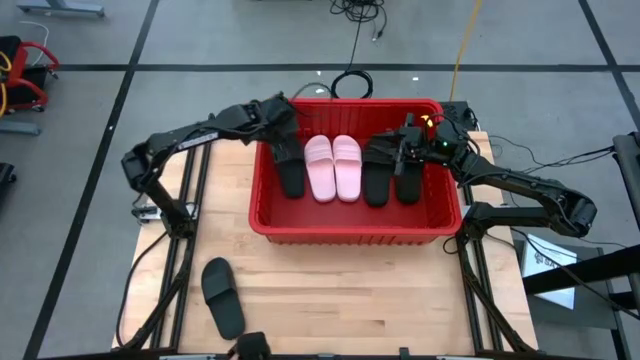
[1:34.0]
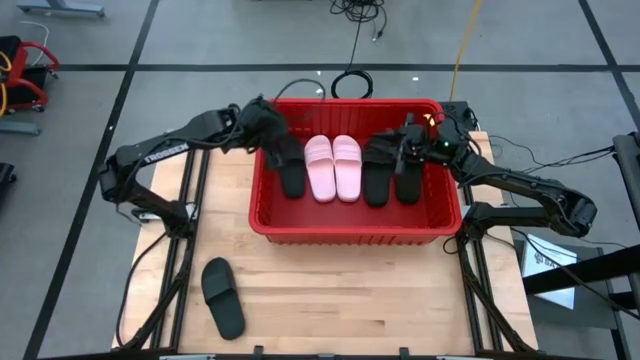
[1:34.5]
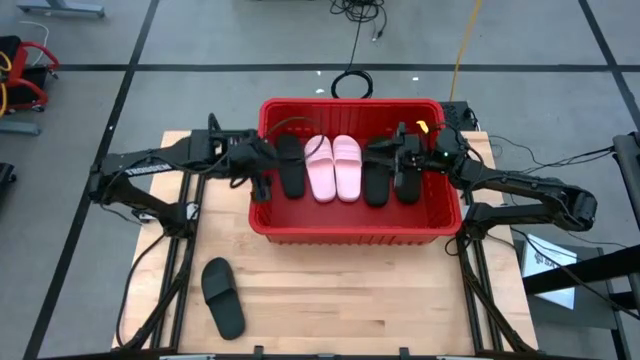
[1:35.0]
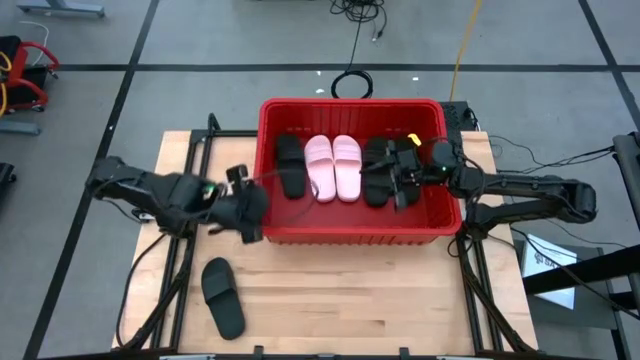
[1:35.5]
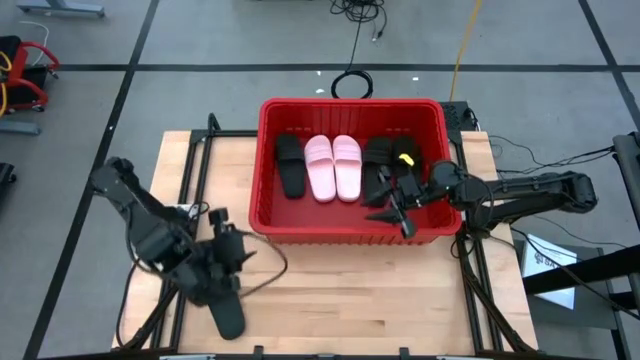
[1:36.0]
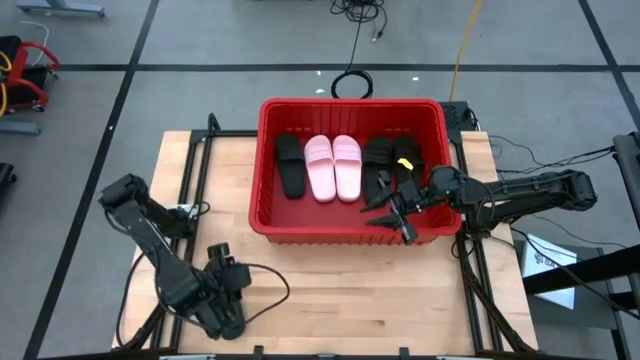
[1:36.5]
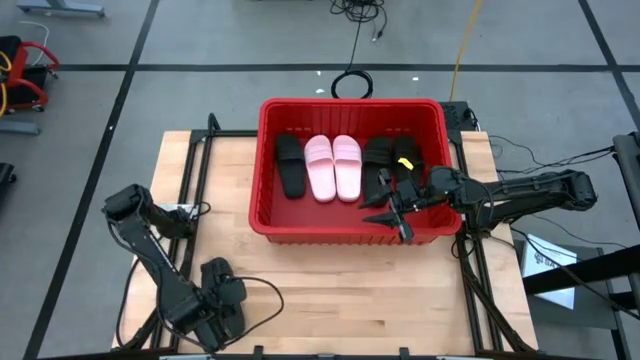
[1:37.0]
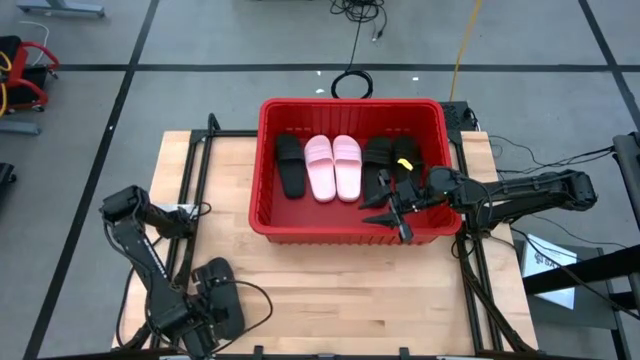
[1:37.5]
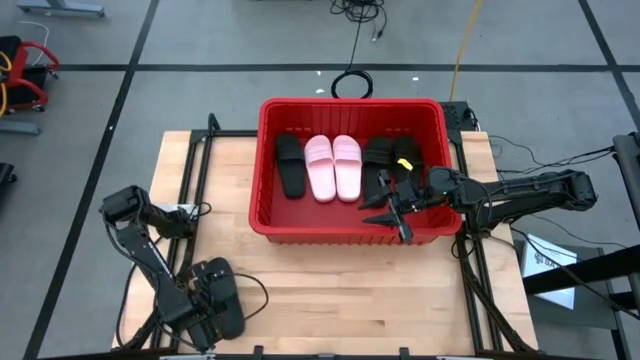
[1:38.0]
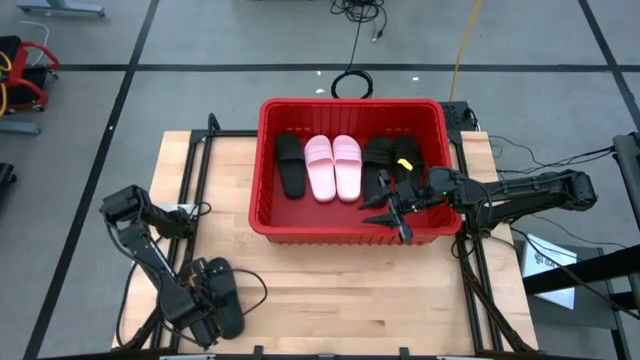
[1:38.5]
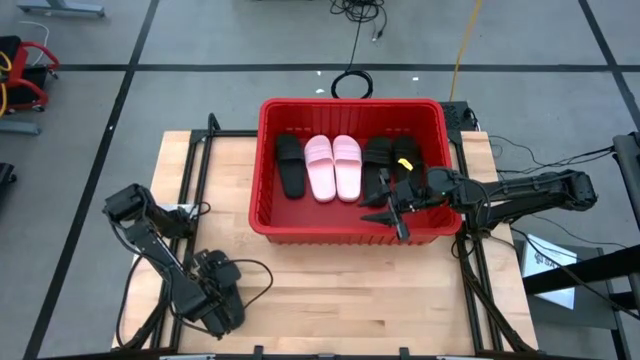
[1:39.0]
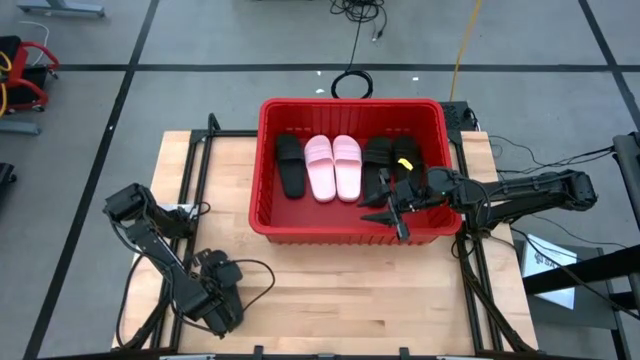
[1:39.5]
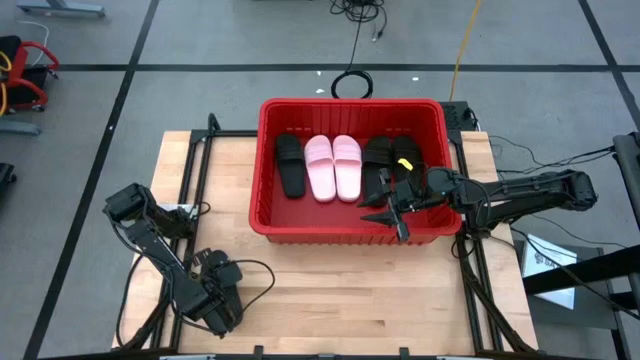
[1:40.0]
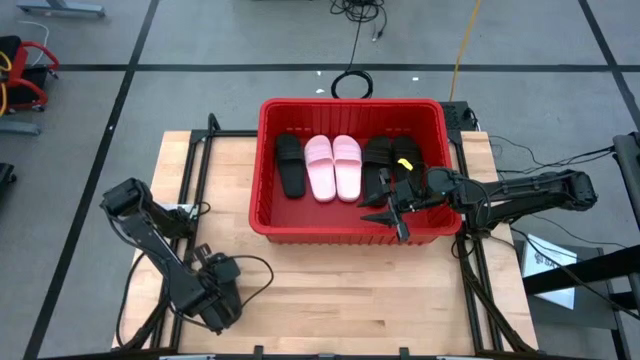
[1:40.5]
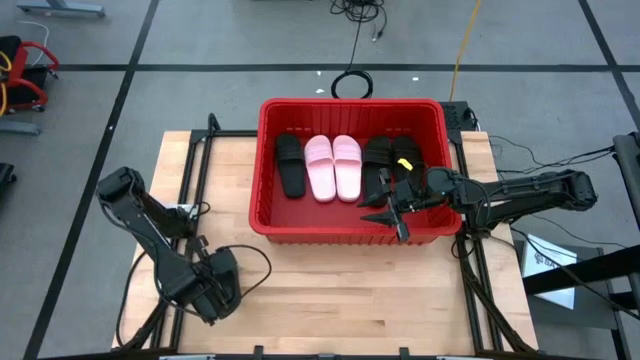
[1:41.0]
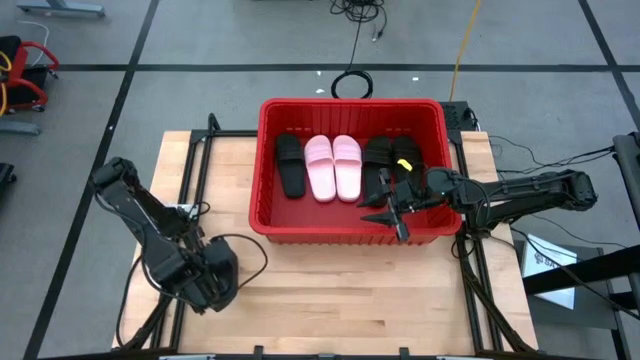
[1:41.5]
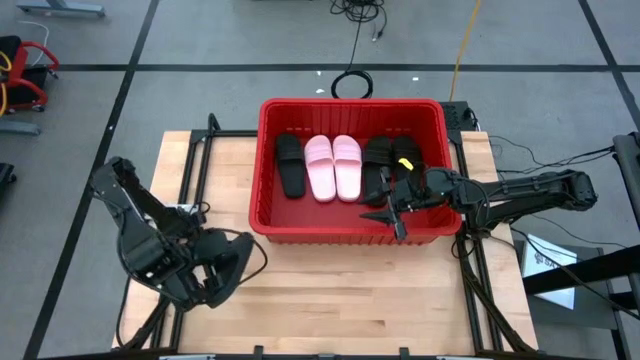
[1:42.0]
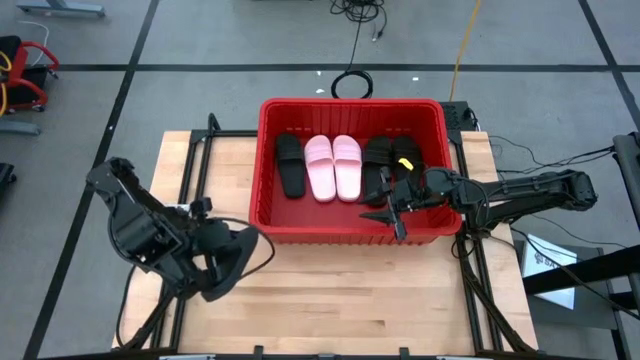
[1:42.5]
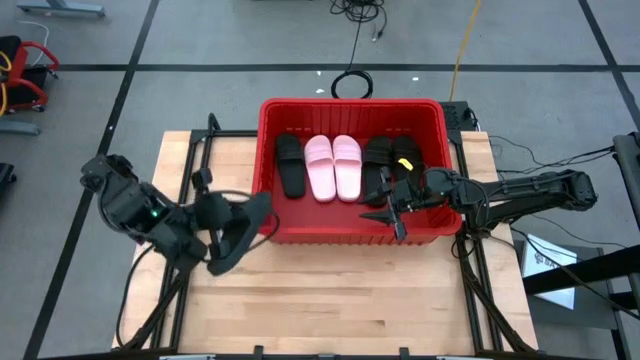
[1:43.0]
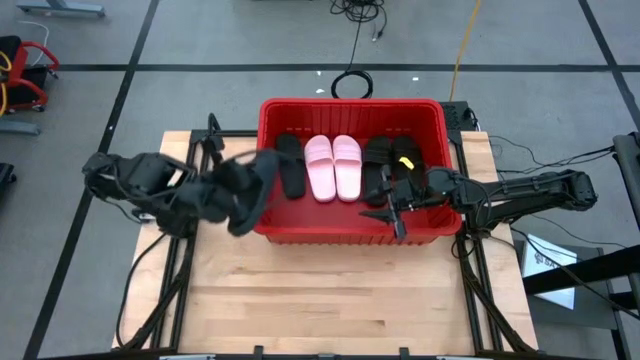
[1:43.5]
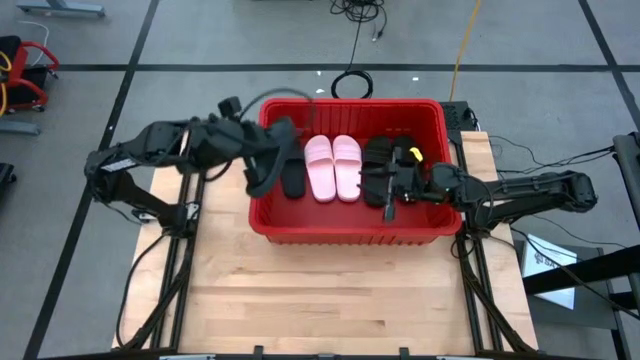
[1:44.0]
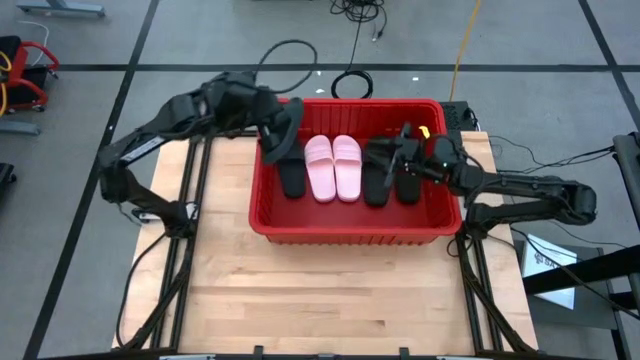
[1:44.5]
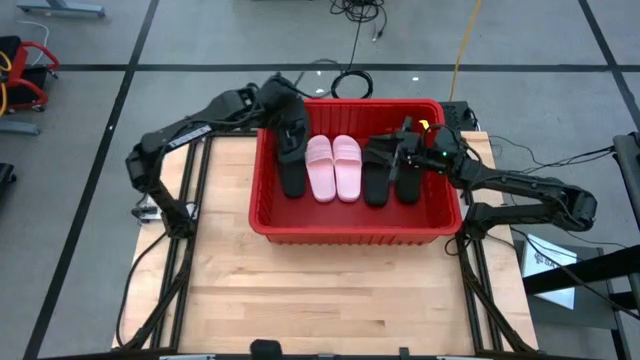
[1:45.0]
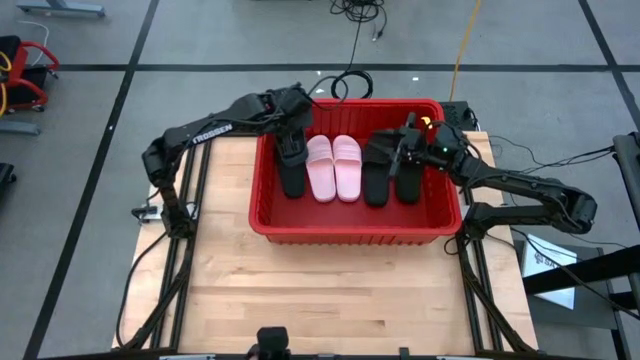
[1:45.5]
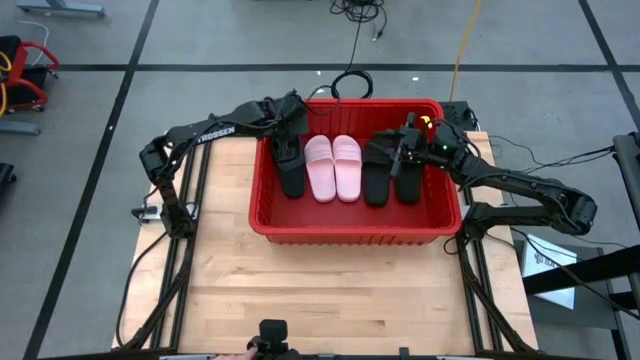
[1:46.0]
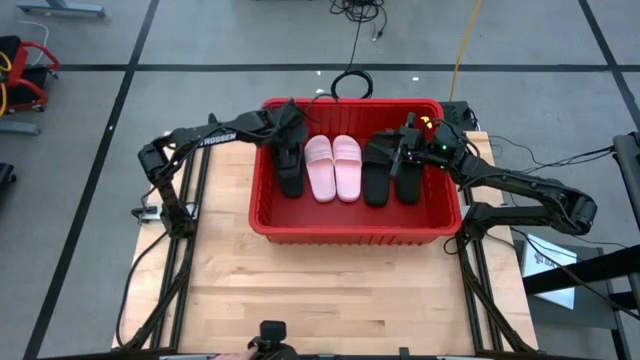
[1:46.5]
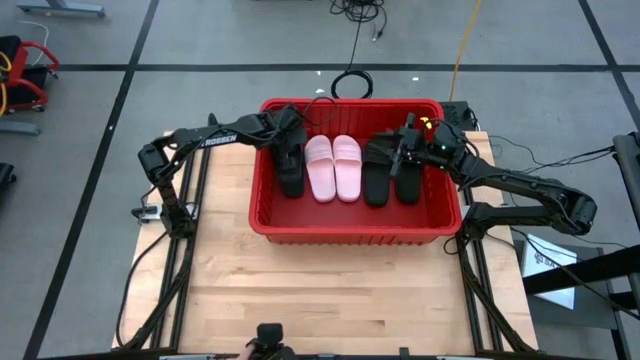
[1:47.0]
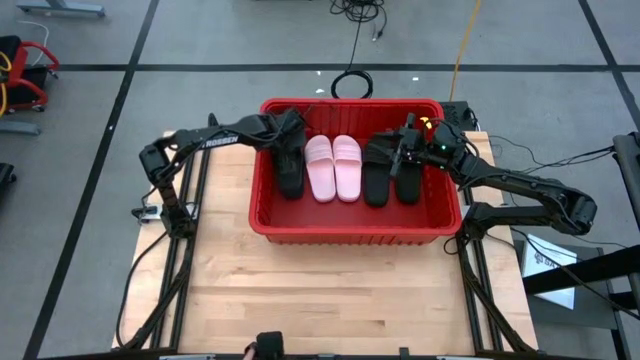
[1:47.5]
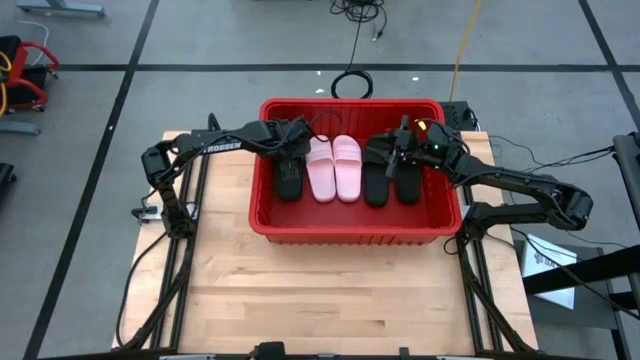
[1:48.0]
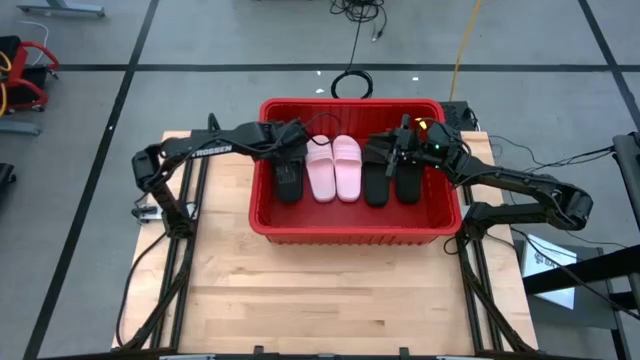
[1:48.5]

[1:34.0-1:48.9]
Task: Pick and place slides into bin
Put the black slide into the red basket
